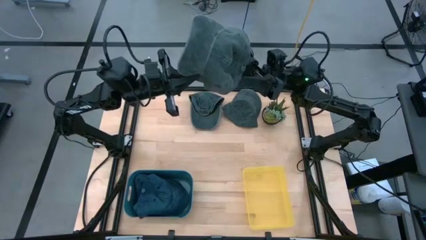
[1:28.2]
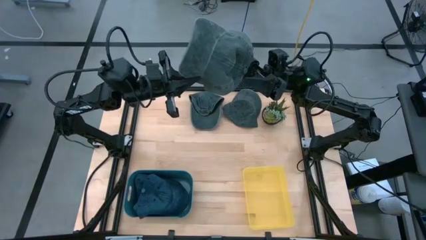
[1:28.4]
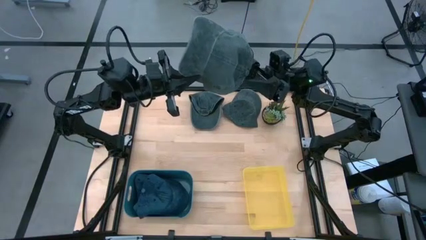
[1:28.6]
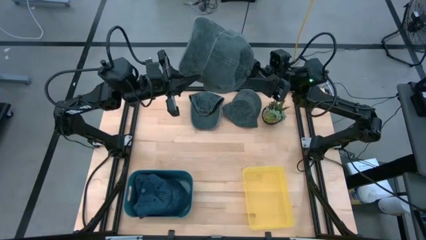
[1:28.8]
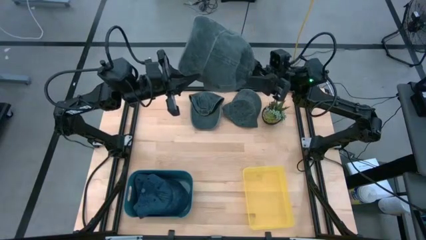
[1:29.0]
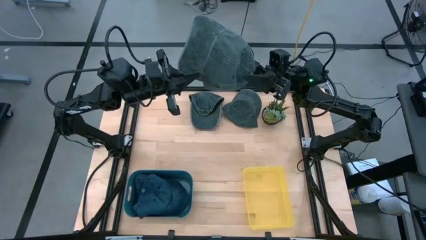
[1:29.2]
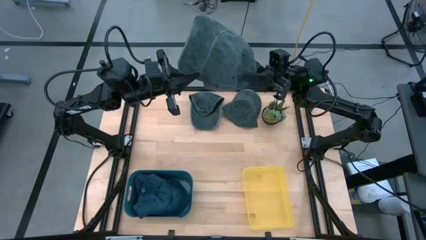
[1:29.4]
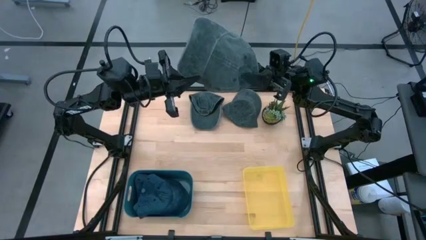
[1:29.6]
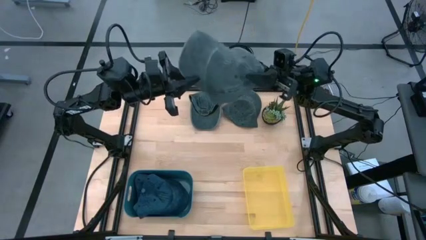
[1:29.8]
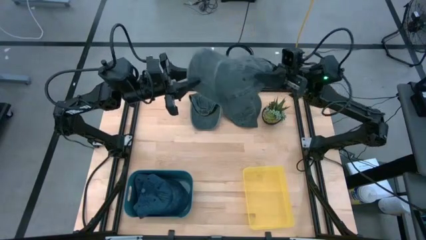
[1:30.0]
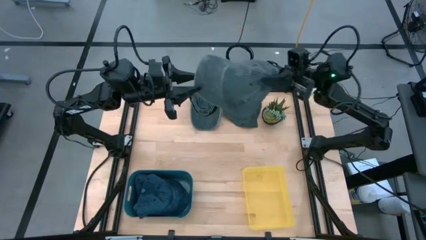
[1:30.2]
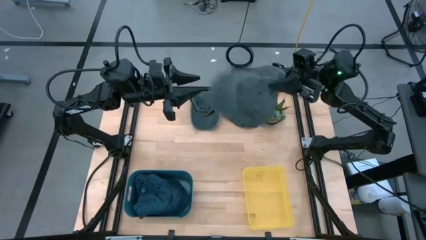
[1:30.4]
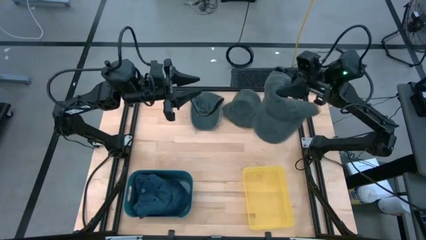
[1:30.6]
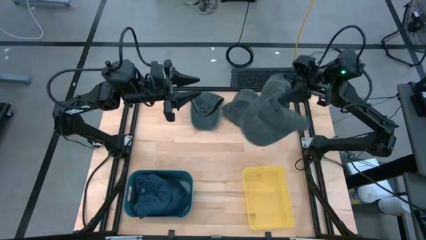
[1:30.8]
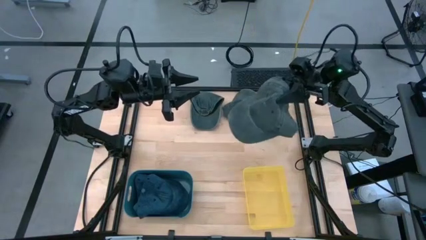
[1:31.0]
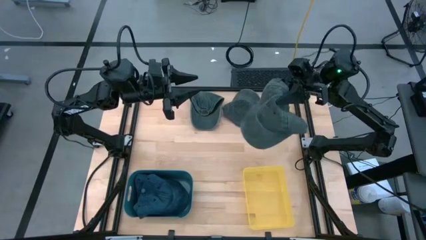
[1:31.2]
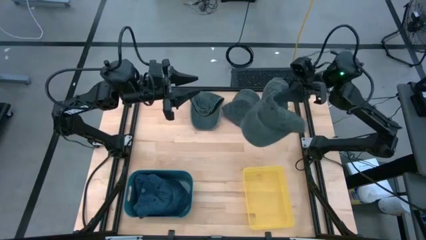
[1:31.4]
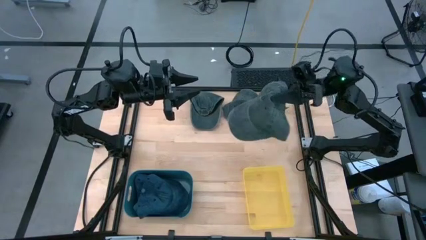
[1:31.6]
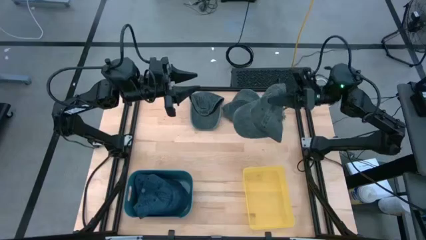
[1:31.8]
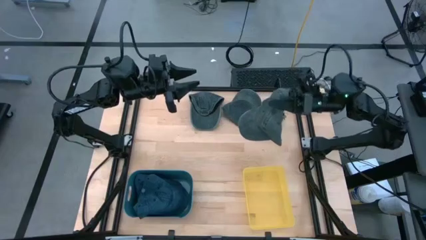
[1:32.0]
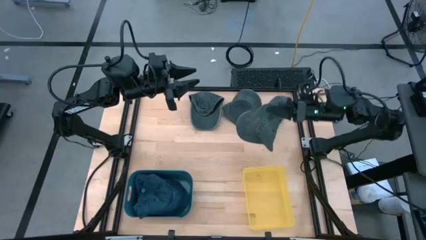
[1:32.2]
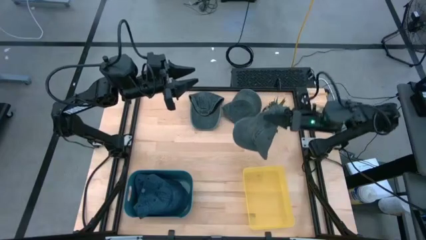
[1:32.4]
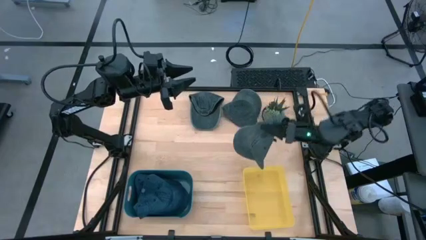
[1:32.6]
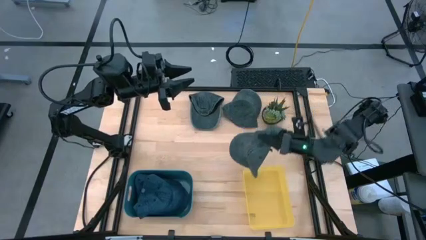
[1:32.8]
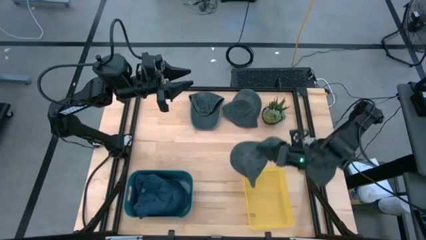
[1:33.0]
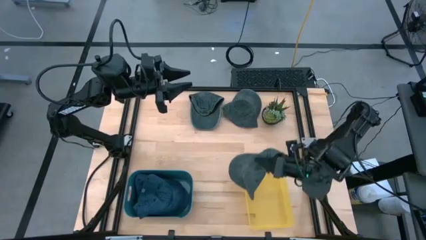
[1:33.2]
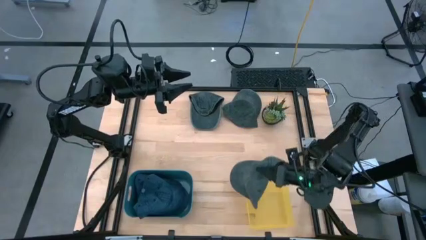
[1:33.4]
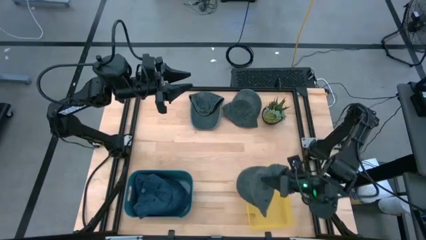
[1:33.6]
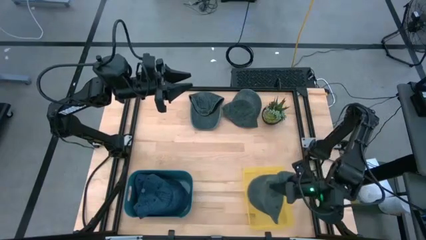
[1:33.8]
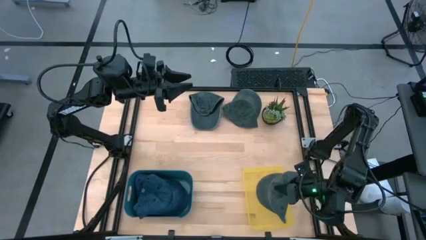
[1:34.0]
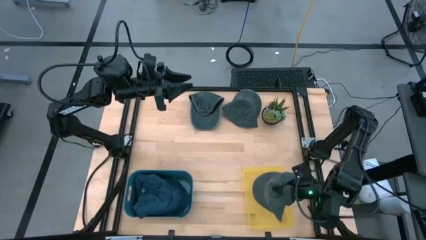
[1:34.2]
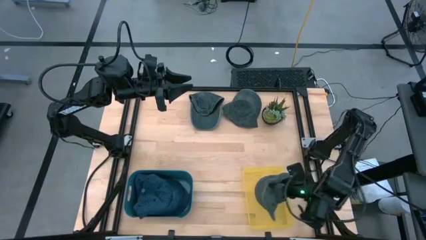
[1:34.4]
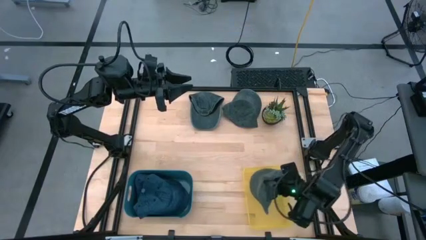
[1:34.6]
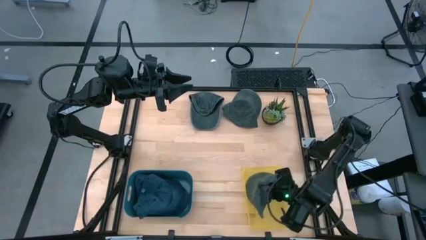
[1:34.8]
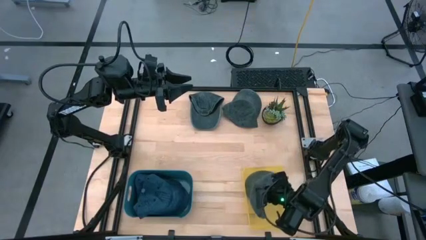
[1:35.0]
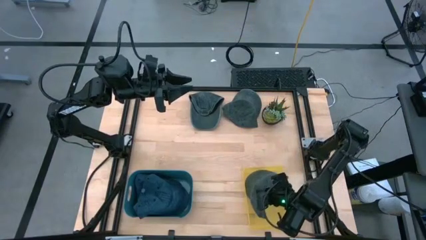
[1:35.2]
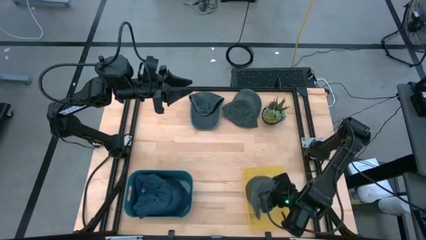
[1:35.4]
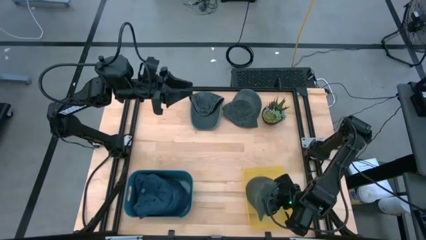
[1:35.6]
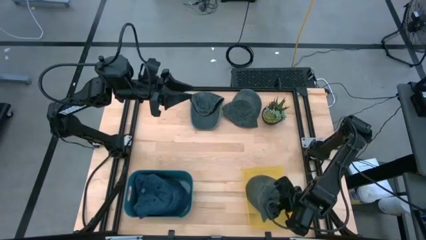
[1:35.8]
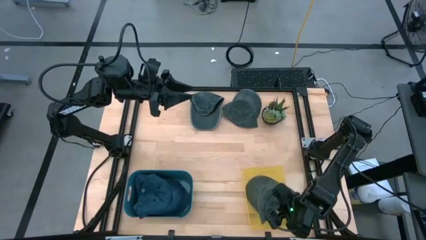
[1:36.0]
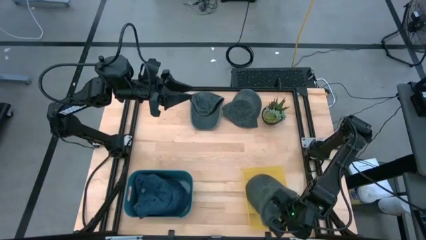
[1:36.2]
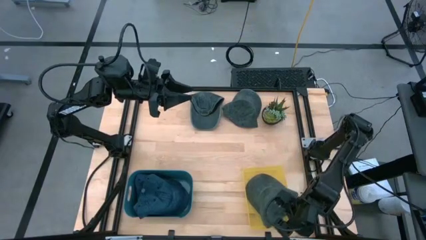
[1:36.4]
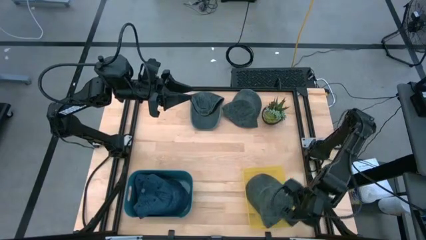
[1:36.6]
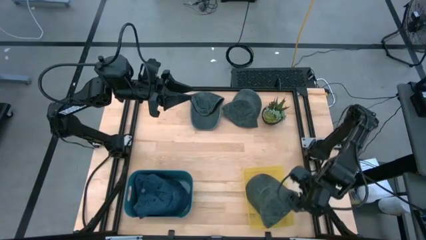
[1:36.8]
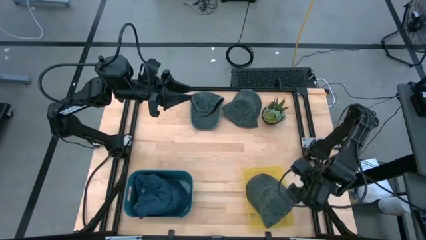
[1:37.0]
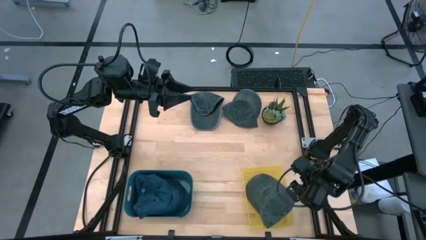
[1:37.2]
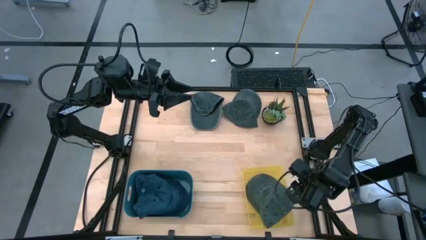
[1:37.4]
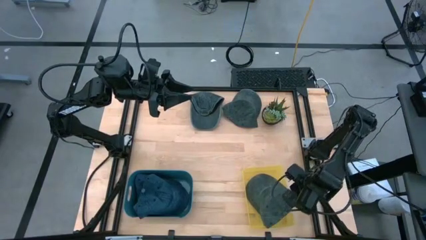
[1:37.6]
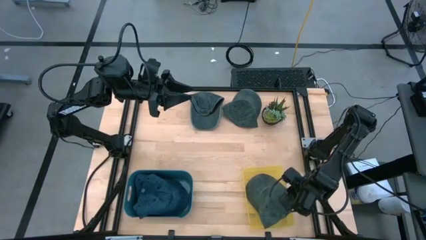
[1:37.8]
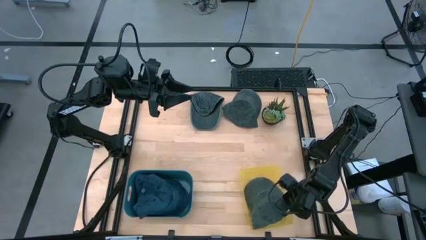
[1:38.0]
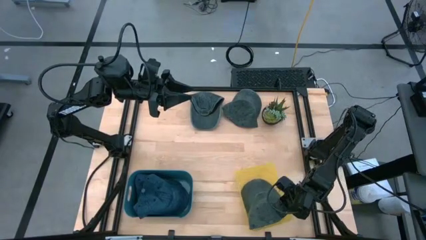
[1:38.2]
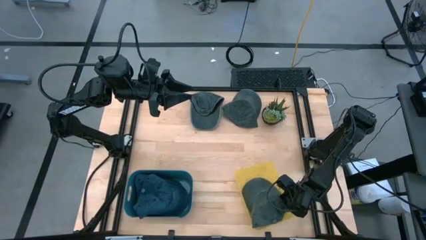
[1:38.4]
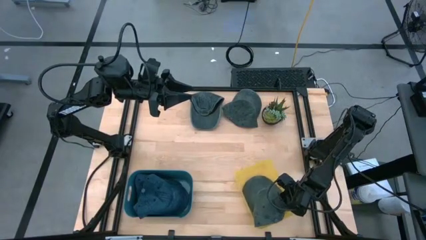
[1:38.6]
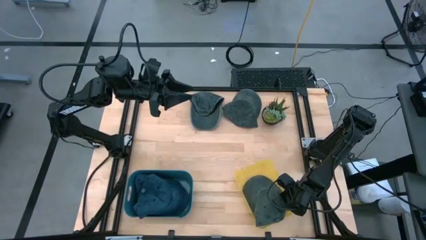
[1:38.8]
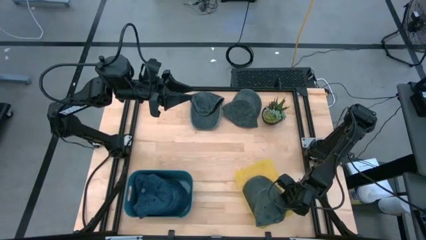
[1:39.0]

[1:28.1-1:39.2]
Task: Pick & Place hat
Put the left gray cap into the yellow bin

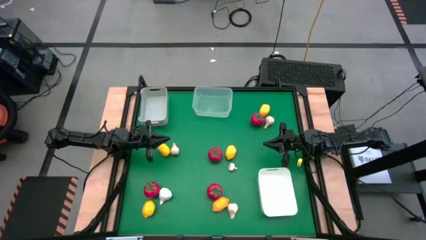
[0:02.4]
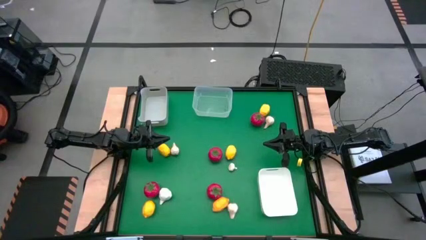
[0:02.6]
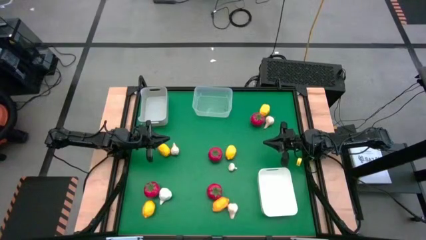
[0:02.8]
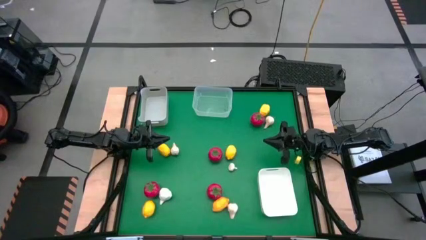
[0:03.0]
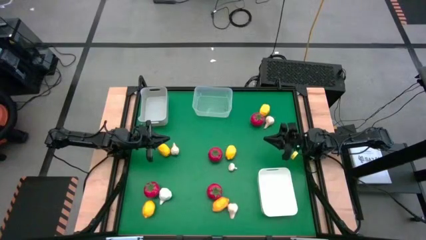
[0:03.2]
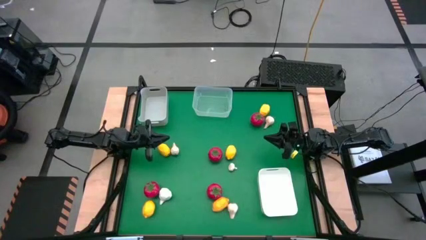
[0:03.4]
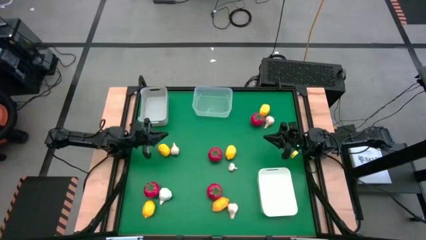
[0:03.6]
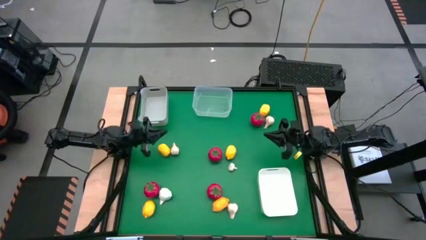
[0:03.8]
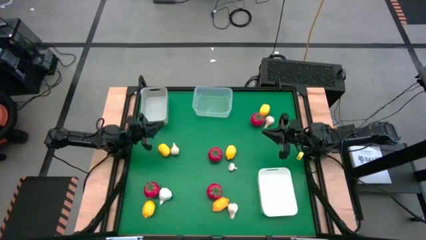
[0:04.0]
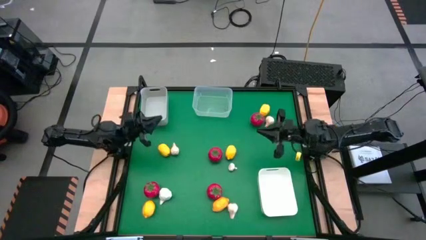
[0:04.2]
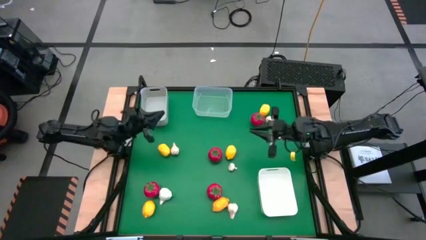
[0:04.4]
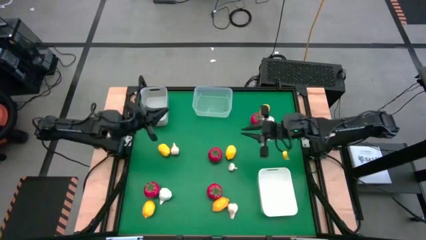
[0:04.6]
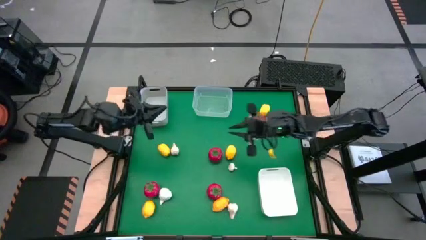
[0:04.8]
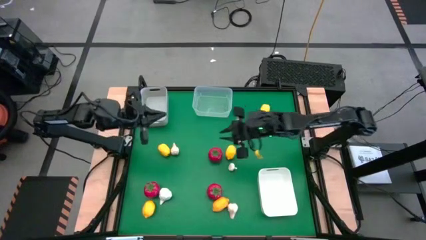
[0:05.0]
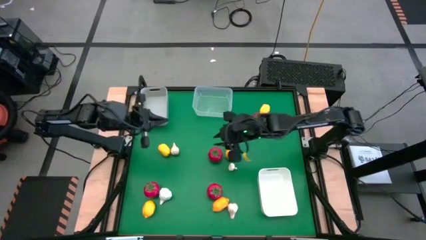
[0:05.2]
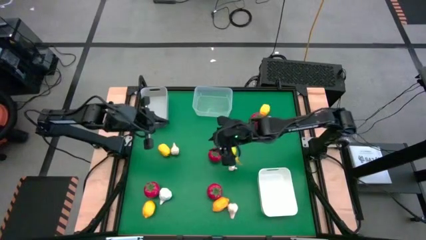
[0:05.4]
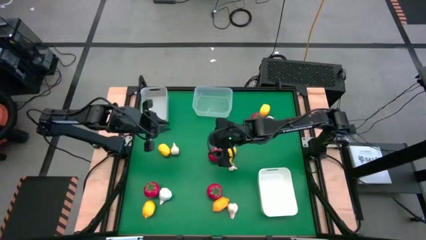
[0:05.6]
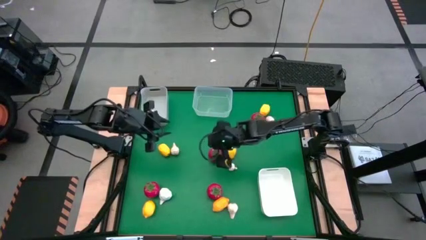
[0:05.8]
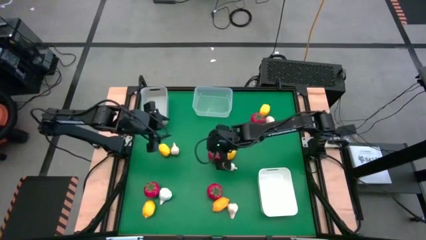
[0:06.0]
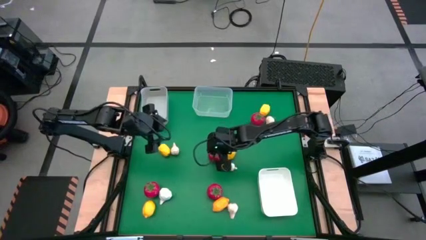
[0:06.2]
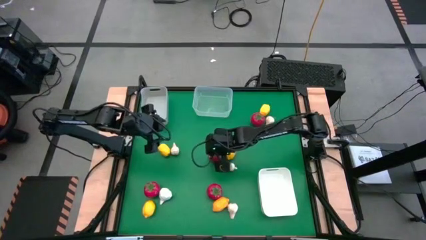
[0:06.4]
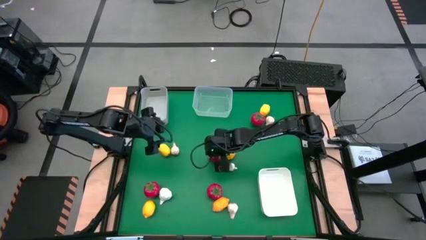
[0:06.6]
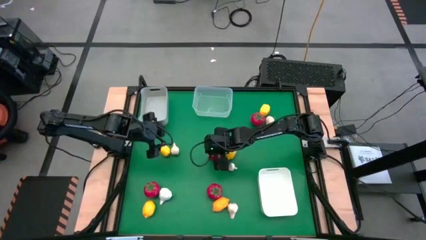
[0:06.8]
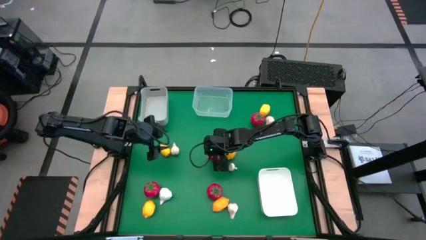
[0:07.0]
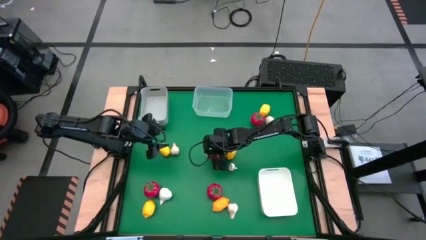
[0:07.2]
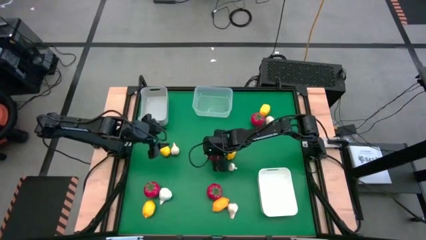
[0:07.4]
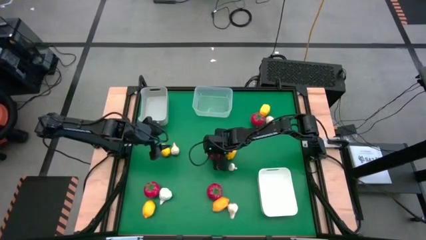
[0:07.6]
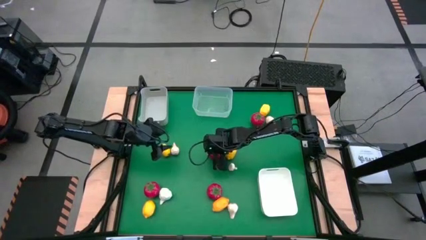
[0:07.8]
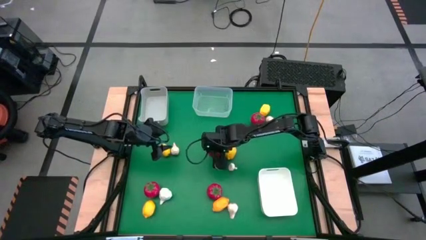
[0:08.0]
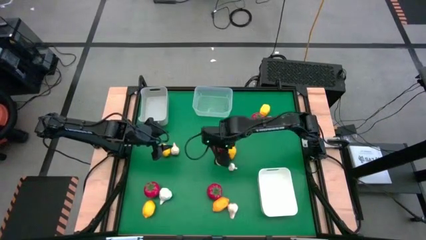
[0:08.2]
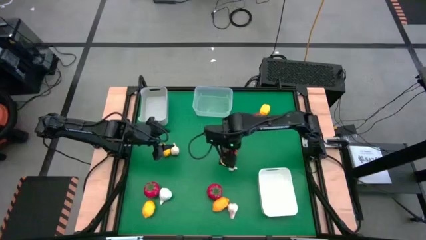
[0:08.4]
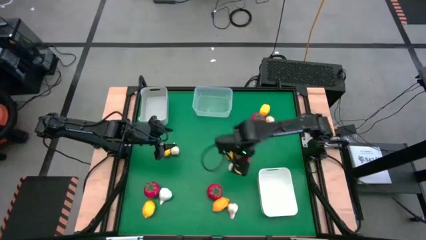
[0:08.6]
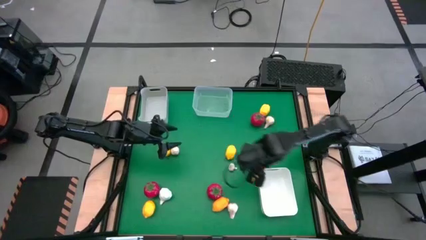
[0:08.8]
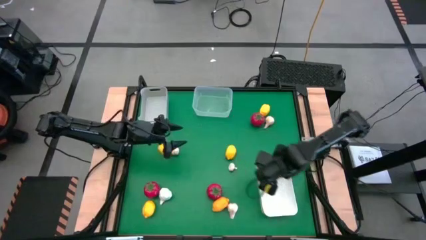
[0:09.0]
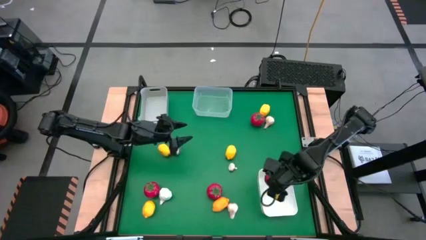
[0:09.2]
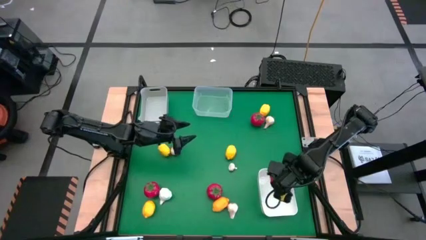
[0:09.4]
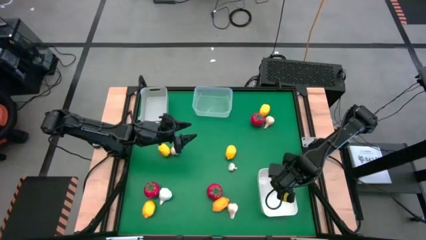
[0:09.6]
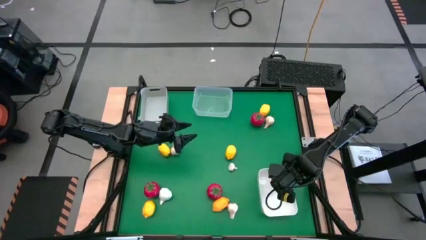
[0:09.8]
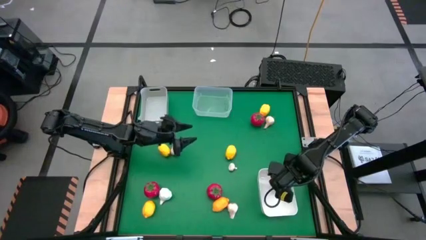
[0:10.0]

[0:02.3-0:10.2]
Task: Sort produce into baskets
Put the red tomato into the white bin
